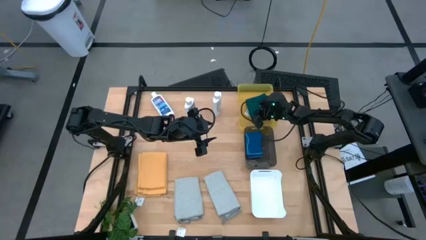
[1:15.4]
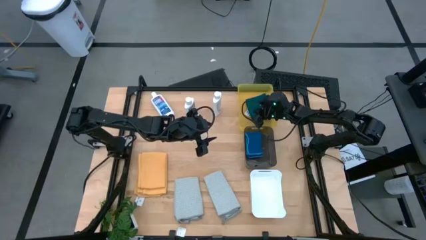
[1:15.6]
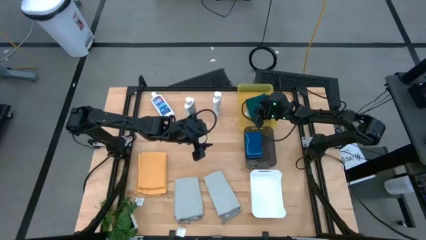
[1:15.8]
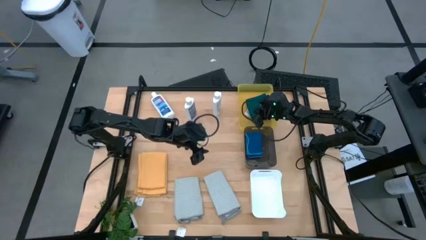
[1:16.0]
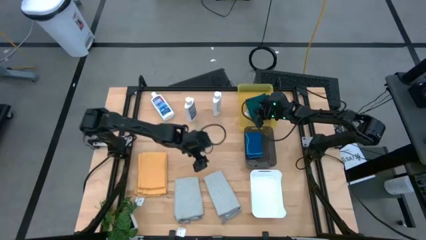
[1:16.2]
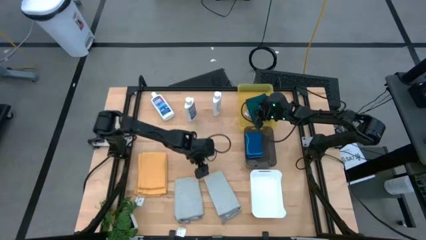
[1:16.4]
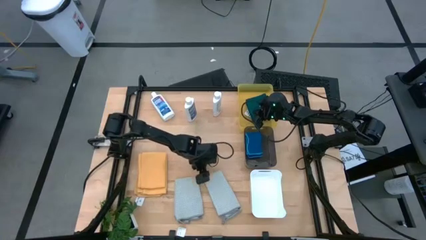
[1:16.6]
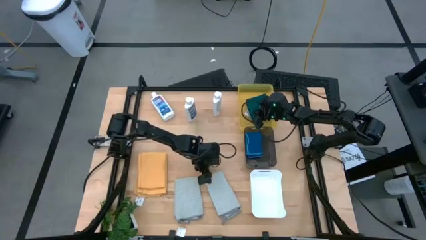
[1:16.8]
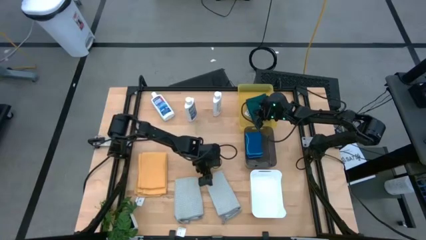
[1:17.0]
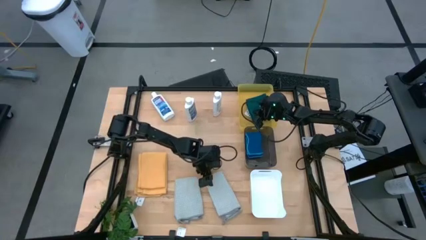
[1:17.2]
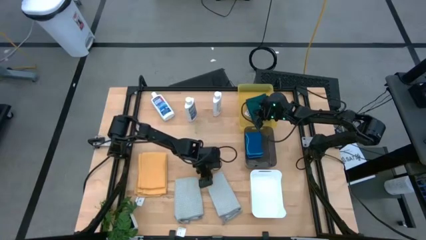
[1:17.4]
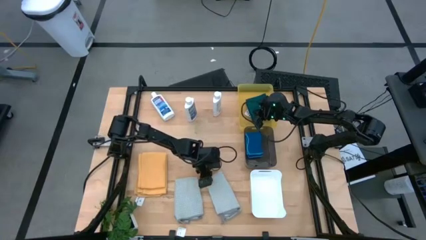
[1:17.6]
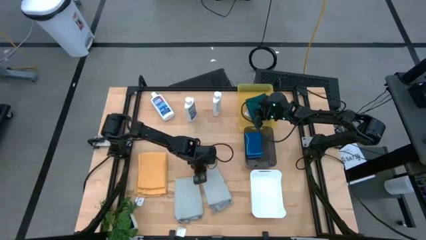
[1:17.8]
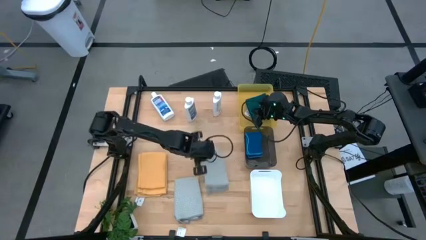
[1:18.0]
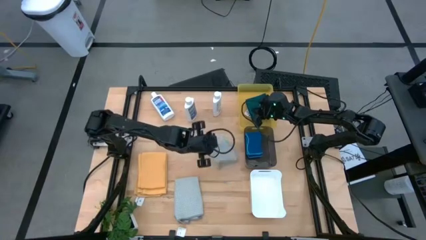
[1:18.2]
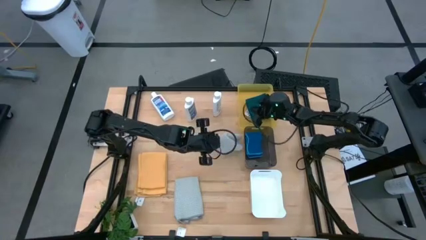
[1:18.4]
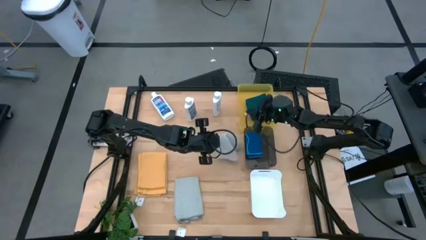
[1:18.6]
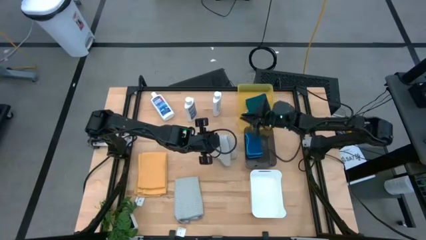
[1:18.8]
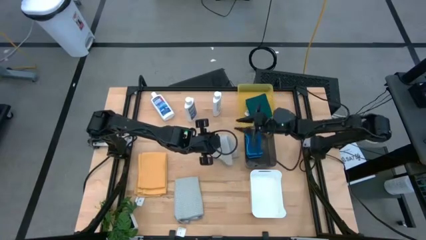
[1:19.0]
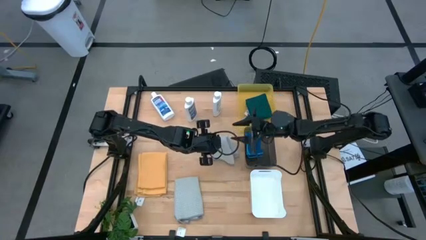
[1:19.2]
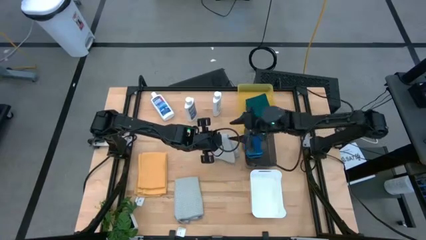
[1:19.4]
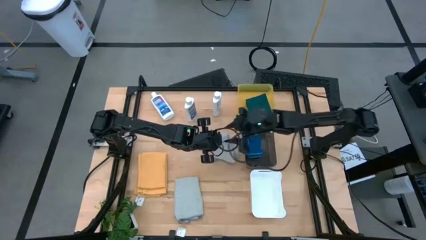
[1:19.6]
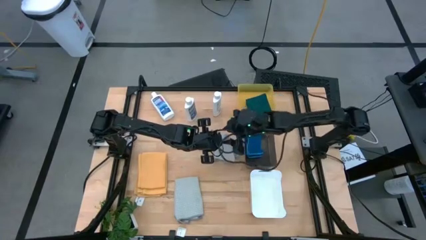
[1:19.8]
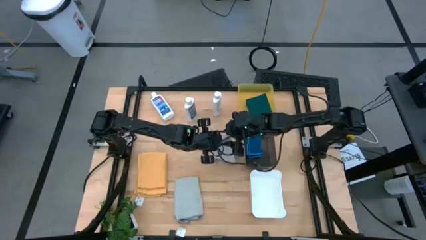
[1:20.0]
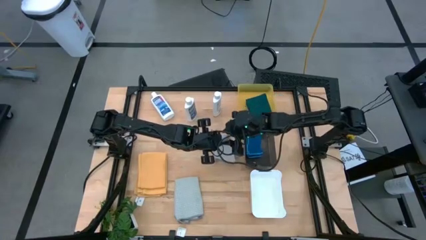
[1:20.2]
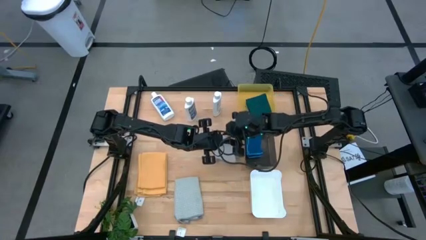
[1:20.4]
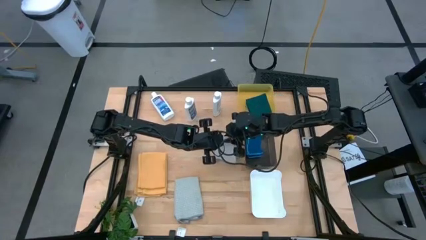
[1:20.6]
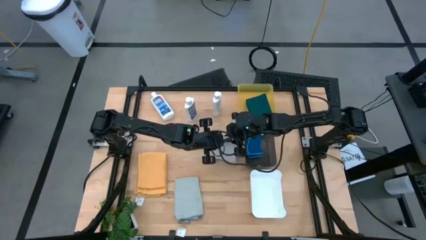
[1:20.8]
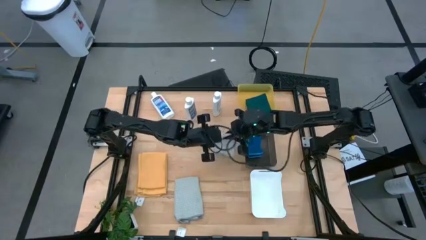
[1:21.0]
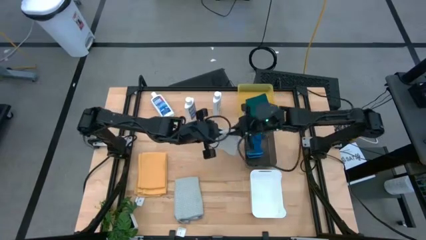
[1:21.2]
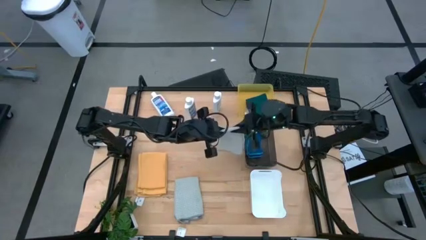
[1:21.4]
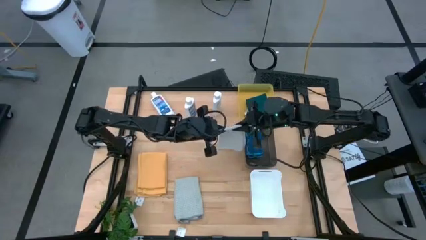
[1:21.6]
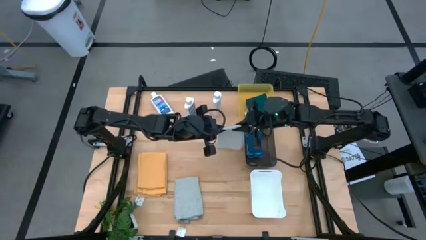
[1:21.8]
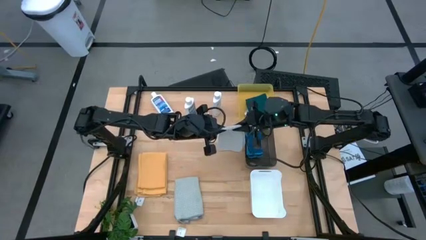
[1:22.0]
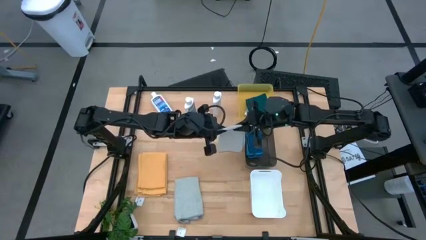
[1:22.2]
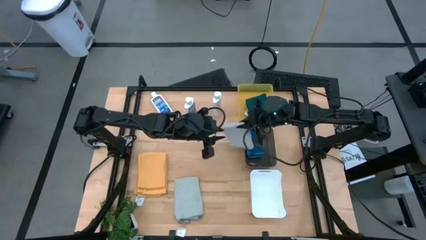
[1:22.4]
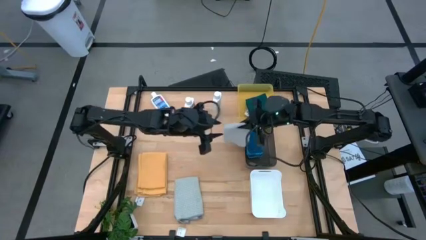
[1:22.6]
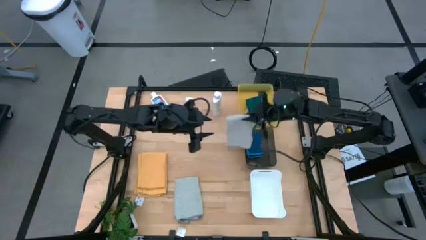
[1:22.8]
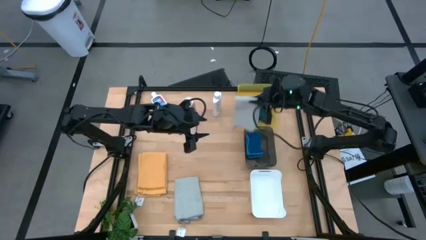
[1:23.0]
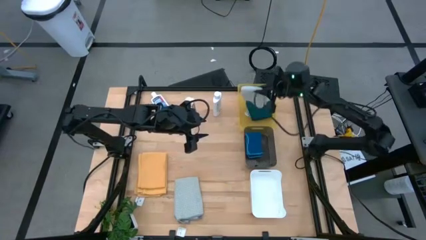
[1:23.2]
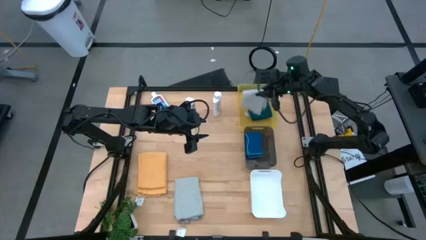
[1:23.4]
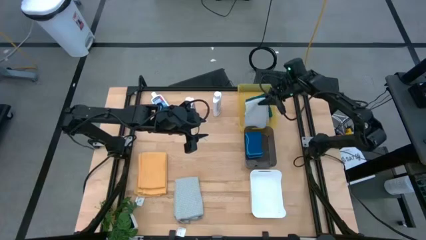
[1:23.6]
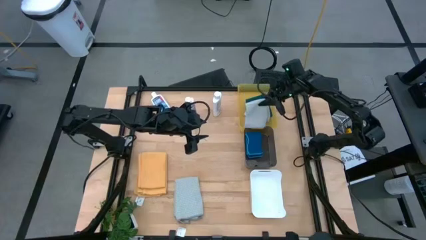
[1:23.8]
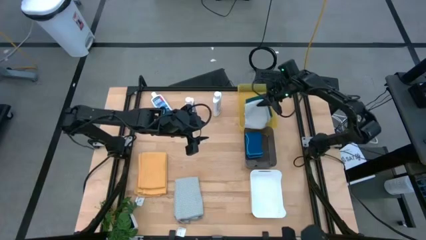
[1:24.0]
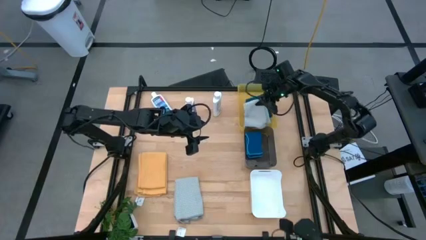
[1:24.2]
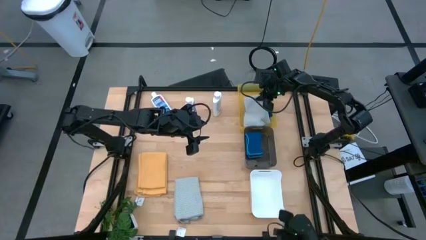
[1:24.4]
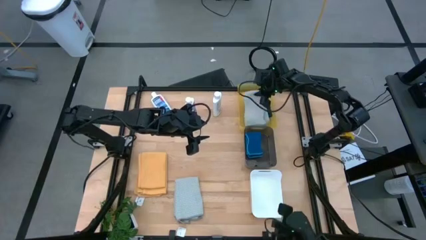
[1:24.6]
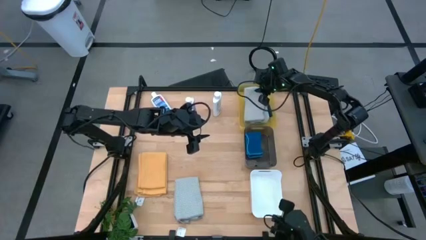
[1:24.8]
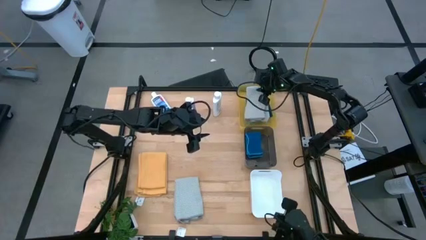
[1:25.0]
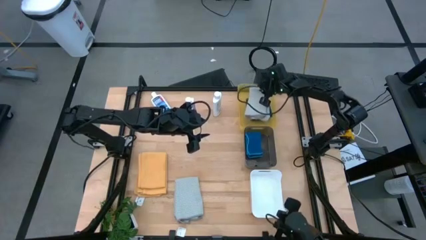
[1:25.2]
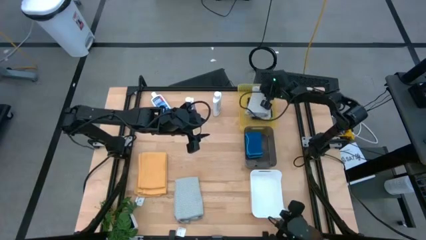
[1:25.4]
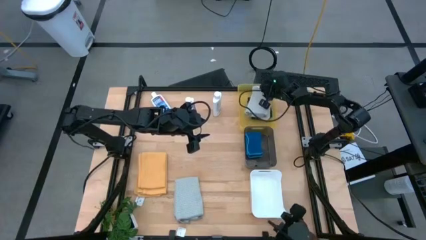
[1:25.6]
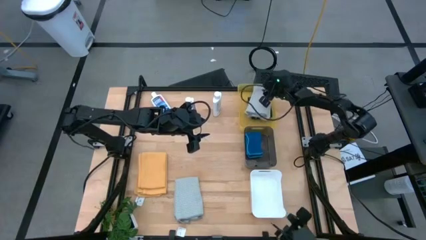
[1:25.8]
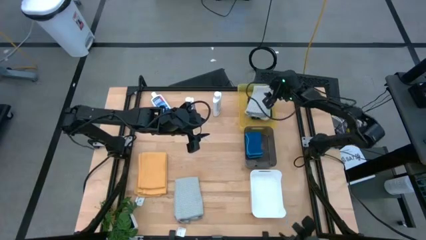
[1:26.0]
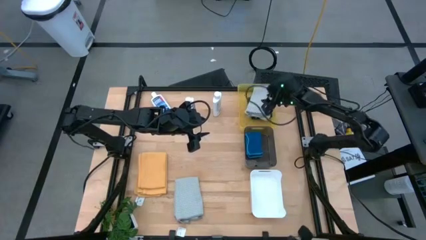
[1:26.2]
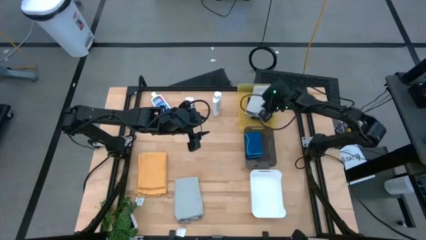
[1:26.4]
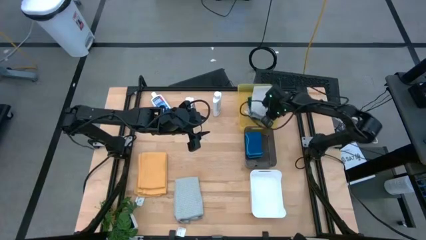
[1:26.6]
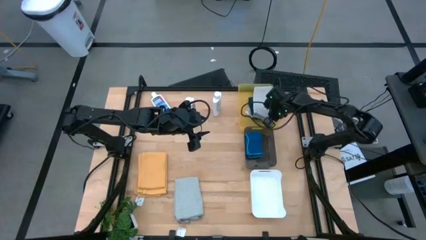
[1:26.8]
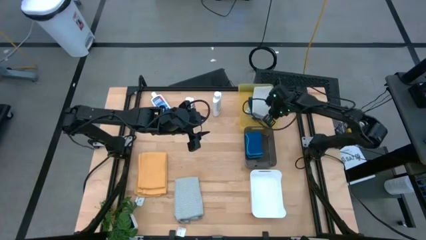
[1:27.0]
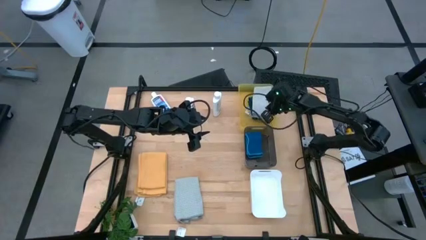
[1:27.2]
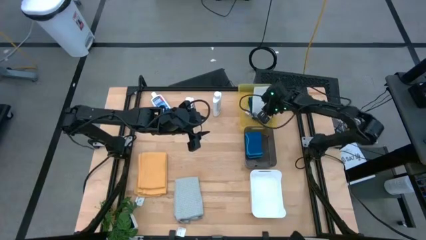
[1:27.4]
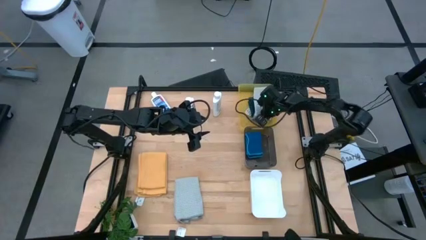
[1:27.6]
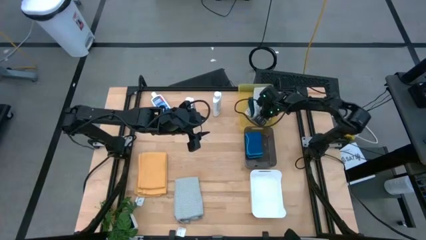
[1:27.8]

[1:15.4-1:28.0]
Task: Pick & Place Kitchen Items
Put the right gray towel into the yellow bin
